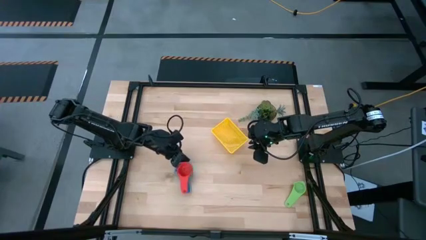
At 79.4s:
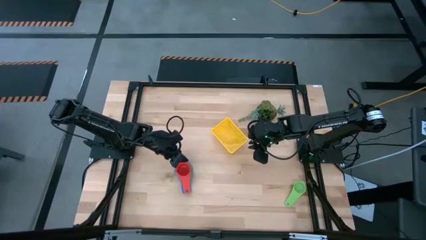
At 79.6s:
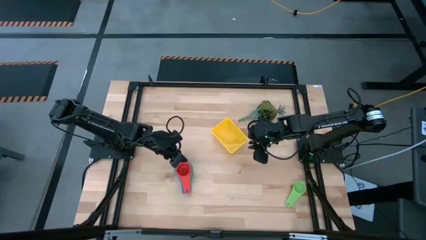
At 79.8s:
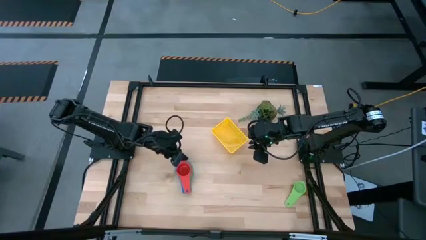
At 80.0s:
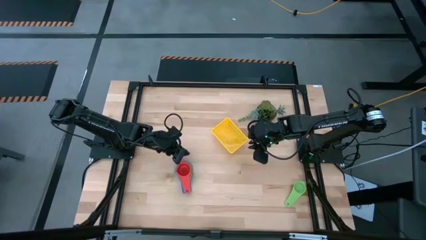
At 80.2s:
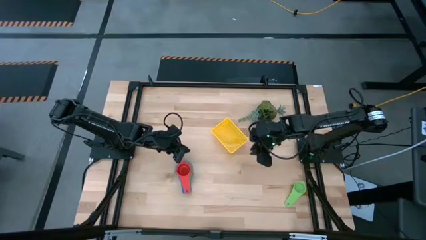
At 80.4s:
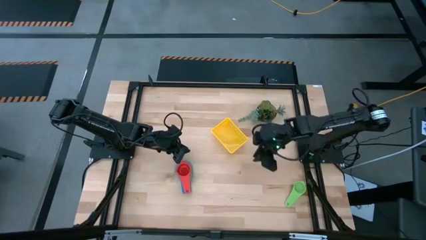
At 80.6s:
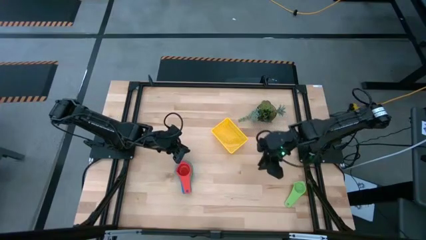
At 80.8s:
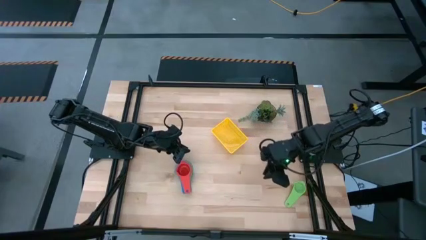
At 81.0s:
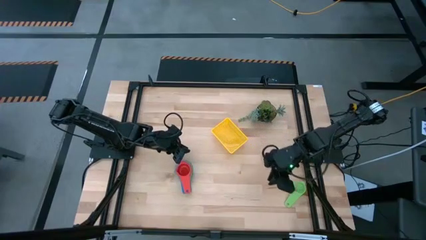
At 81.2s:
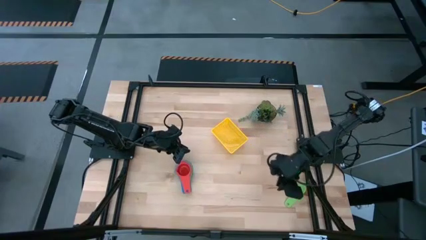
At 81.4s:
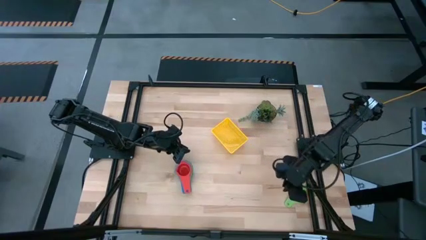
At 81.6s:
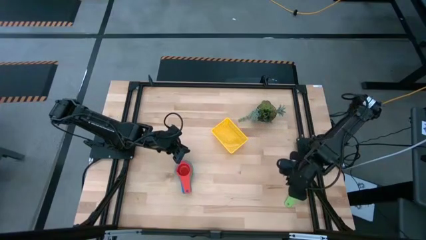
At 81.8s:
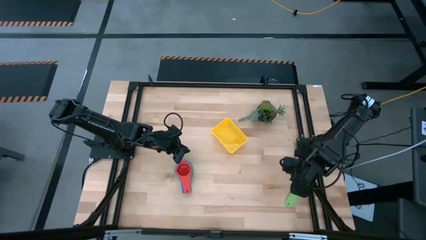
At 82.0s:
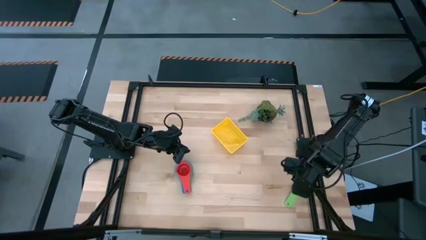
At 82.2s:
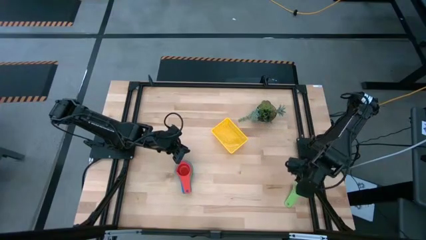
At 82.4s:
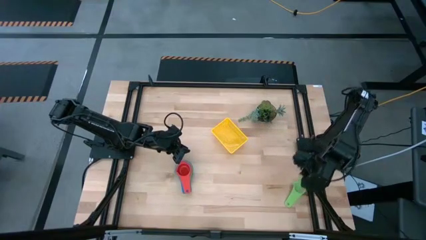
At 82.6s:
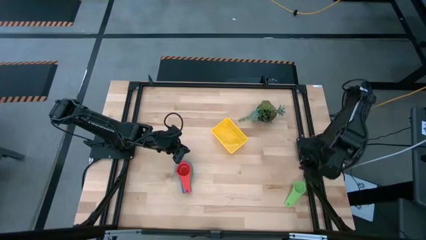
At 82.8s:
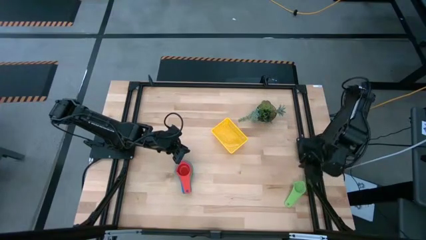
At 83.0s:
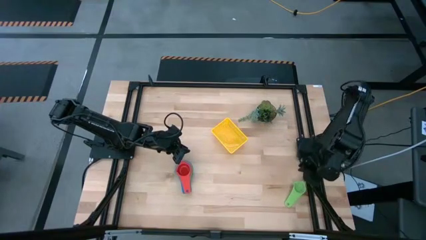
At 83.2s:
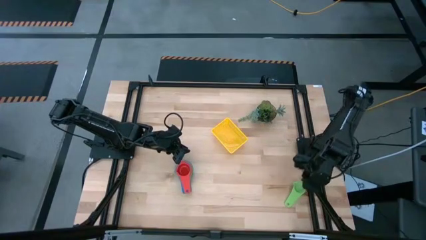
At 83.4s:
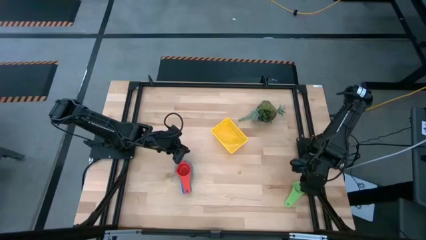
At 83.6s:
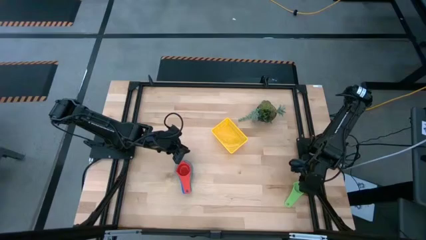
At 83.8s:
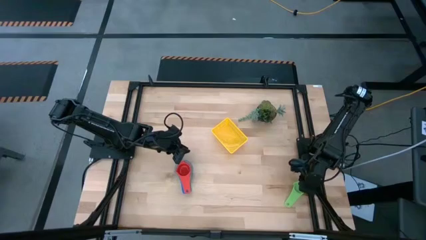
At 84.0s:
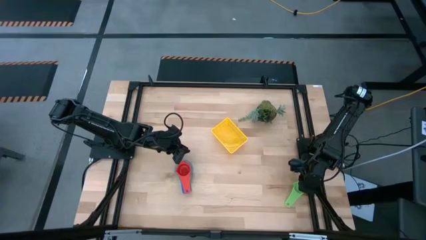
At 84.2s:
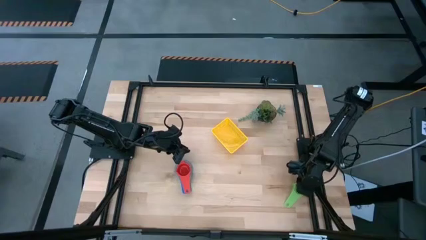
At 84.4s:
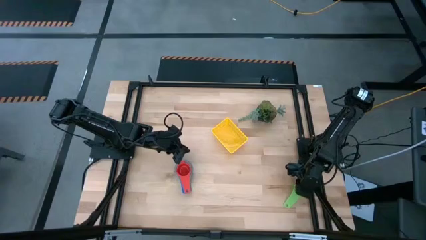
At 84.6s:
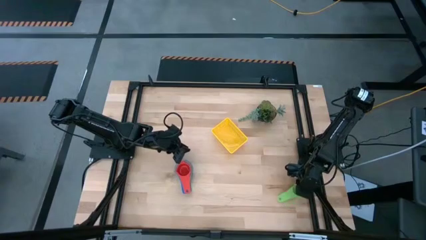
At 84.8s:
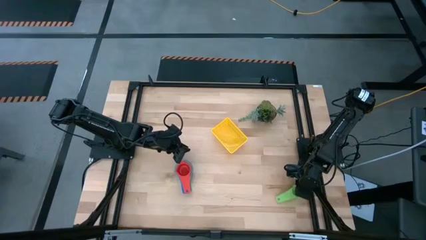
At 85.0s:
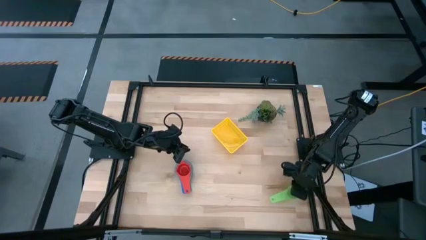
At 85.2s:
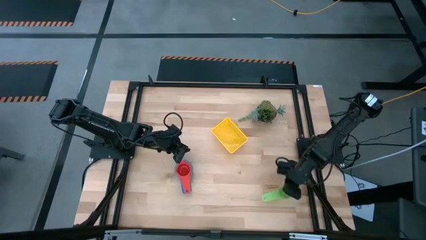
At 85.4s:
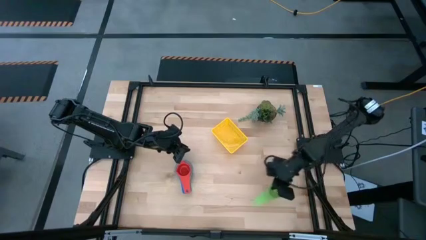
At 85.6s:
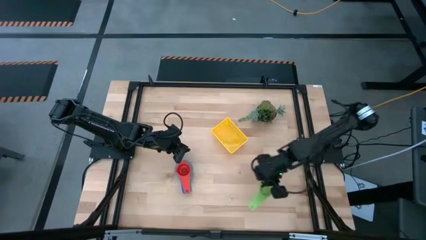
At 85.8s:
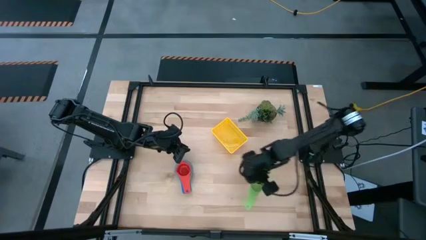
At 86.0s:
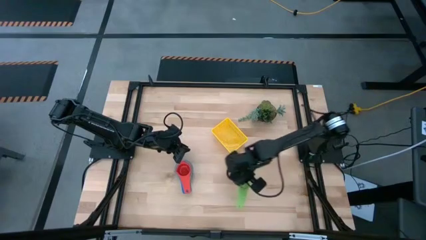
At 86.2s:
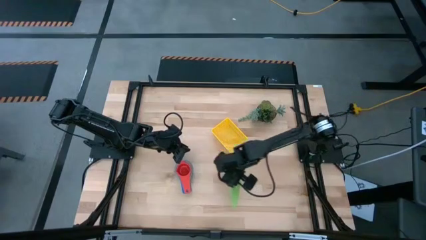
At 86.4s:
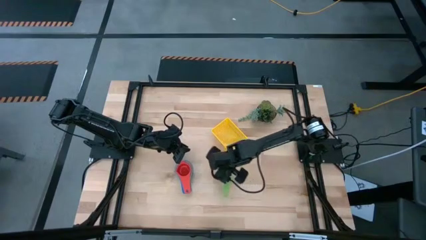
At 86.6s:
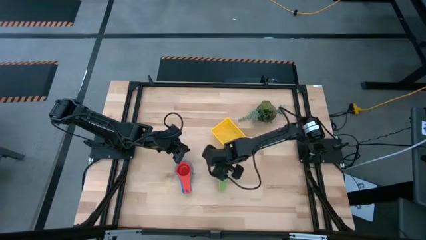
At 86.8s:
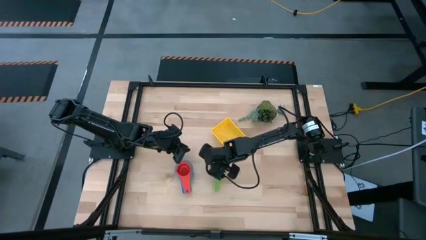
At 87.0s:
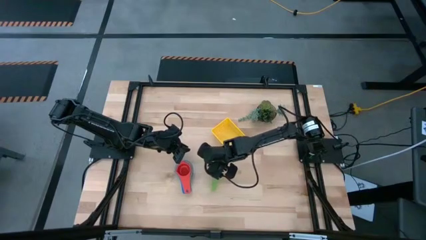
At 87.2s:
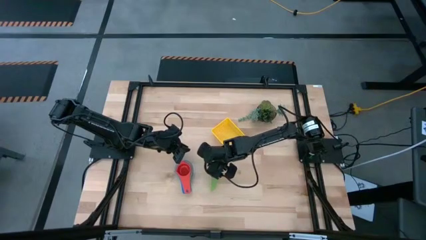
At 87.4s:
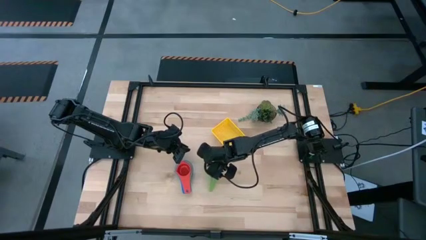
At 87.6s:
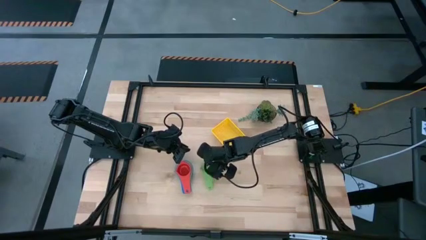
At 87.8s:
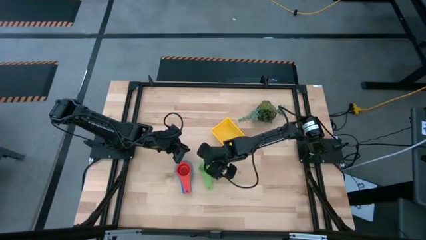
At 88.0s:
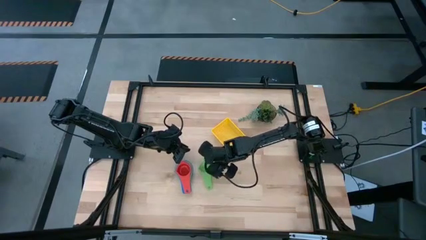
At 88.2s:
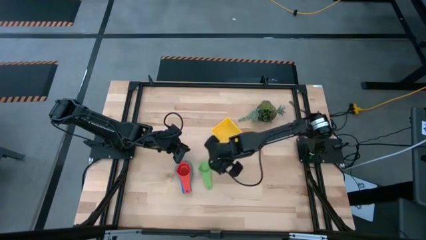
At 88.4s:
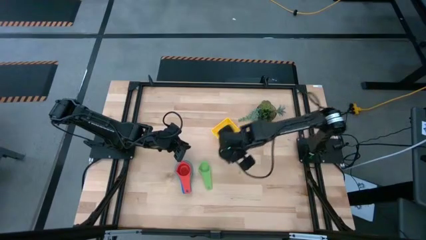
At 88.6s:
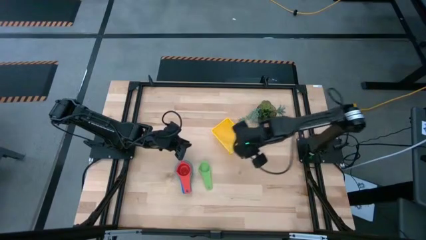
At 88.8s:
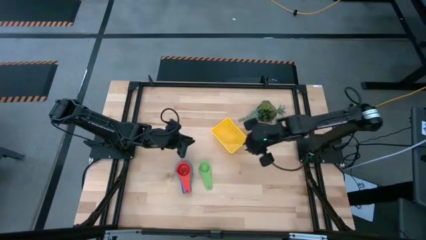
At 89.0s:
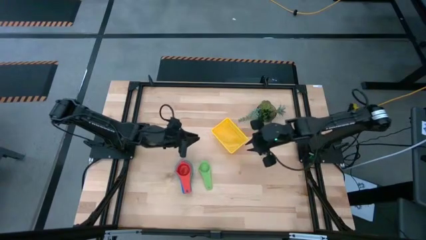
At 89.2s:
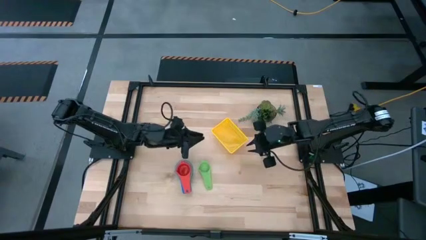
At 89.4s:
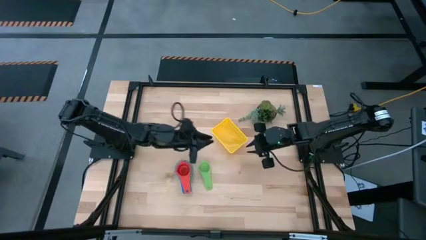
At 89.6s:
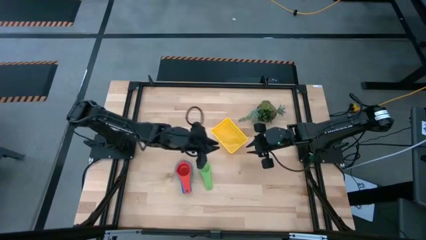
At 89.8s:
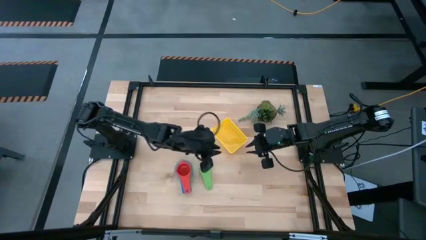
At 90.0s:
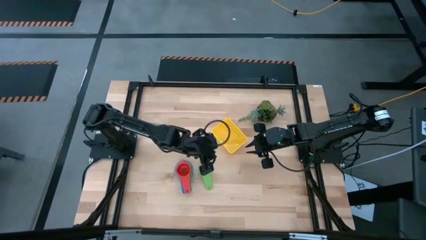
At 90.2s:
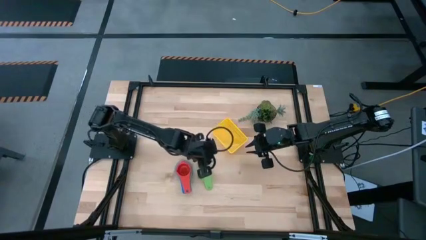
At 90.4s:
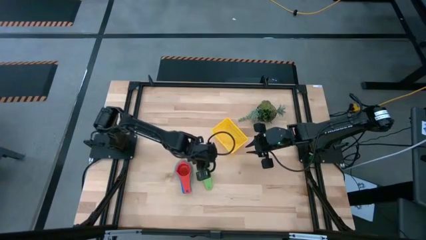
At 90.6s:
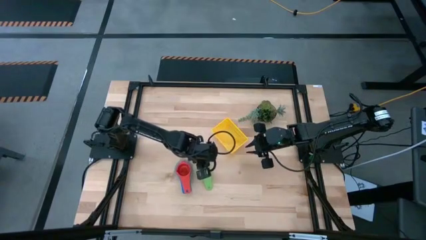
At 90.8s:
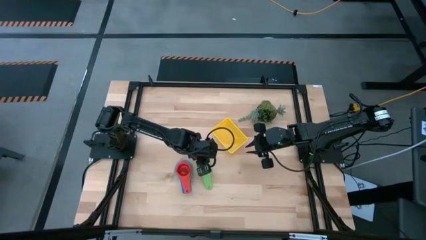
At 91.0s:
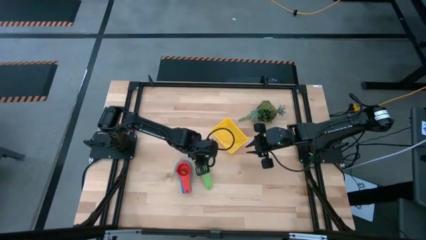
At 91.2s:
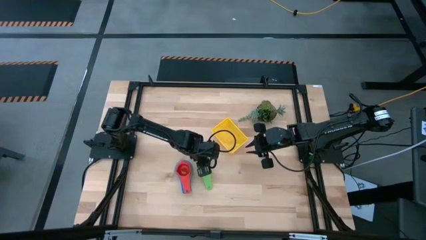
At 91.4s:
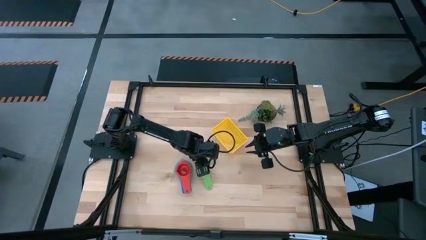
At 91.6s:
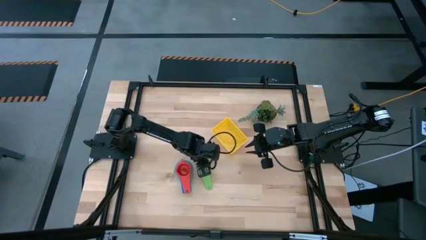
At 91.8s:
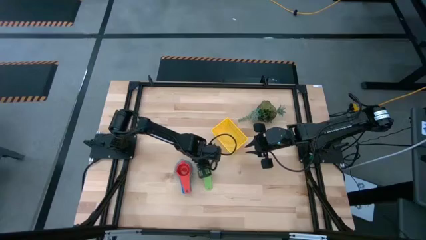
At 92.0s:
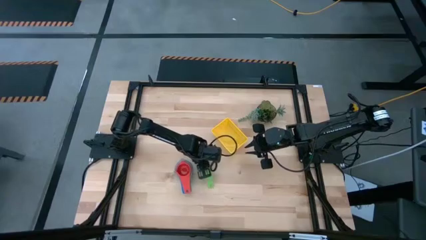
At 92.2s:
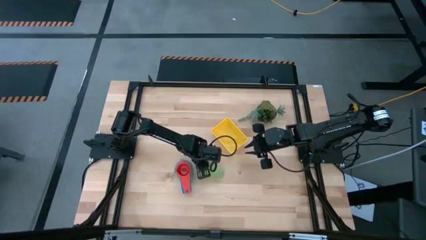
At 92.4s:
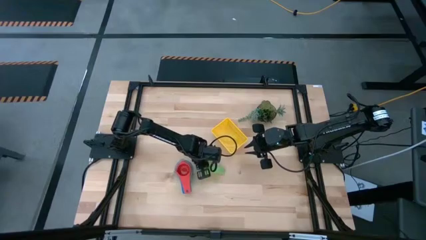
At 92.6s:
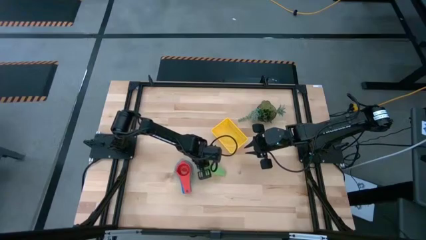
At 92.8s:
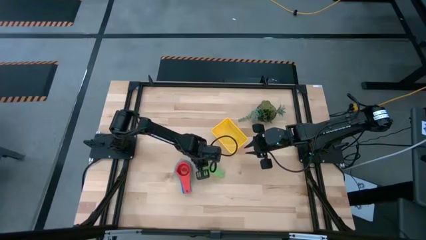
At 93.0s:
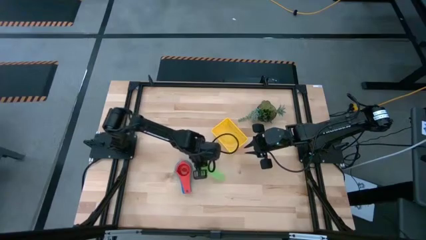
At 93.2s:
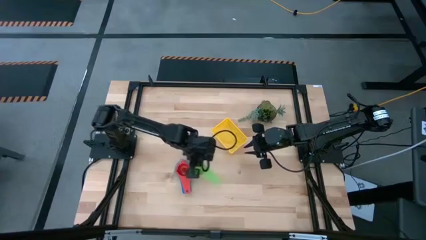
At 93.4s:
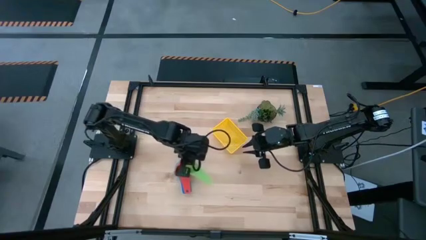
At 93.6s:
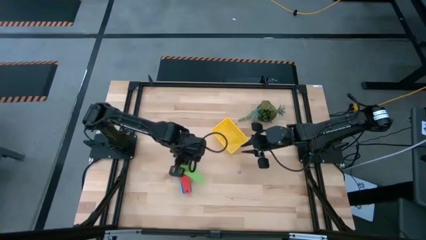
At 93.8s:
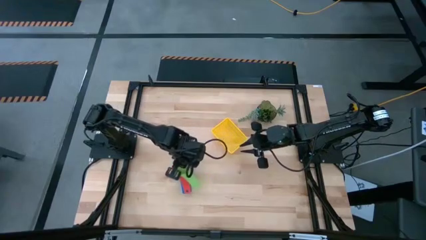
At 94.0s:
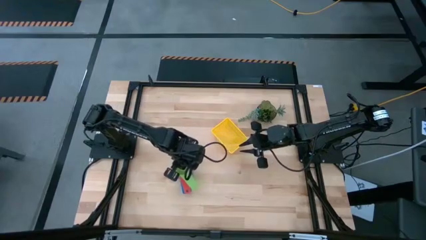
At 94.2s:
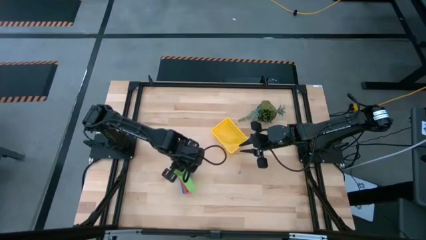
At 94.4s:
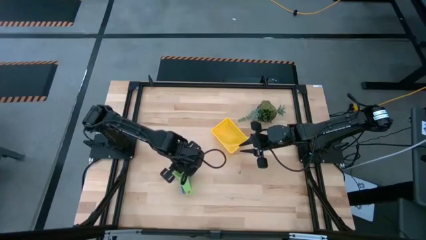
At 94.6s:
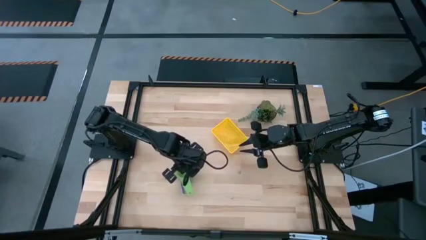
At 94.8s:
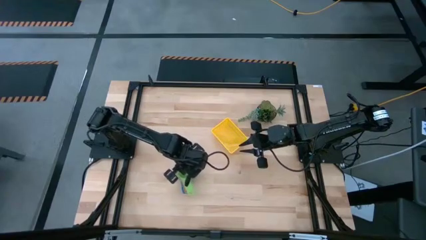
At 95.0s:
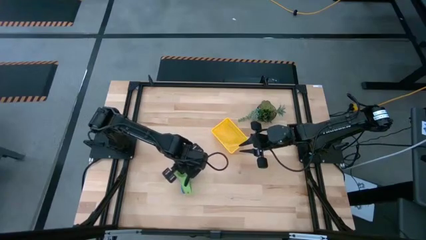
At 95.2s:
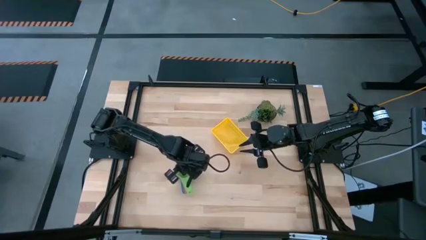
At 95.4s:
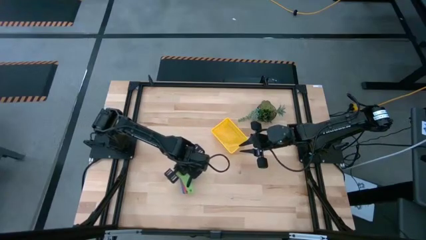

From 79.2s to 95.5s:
Task: Nest measuring cups in basket
Stack the green measuring cup on top of the red measuring cup

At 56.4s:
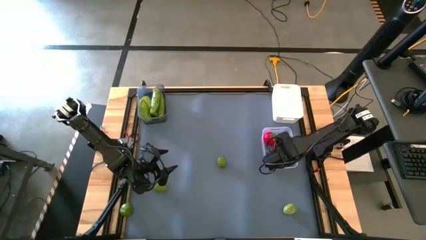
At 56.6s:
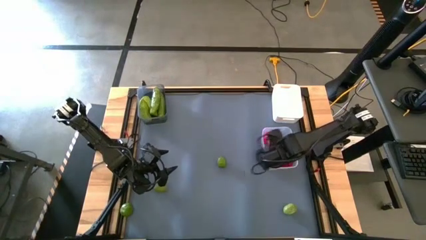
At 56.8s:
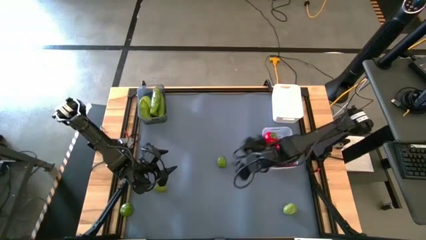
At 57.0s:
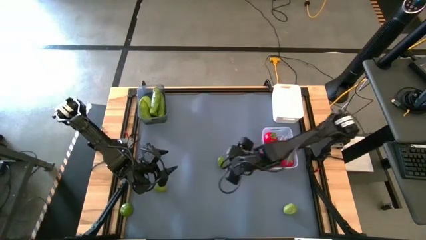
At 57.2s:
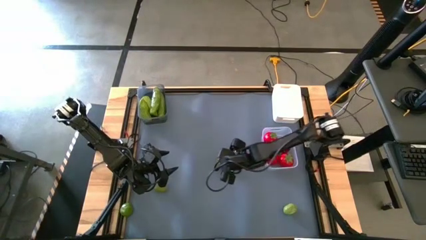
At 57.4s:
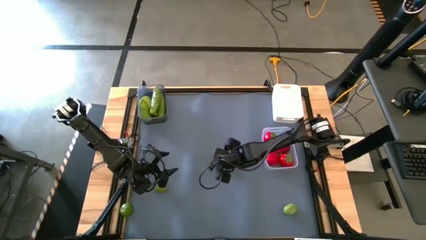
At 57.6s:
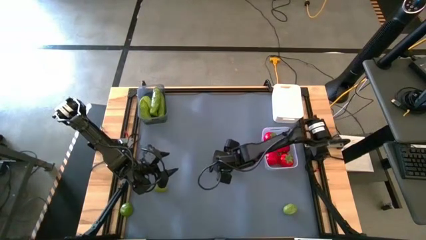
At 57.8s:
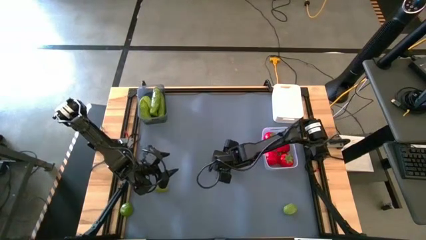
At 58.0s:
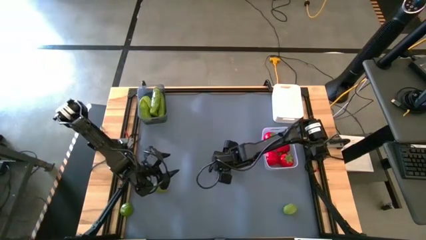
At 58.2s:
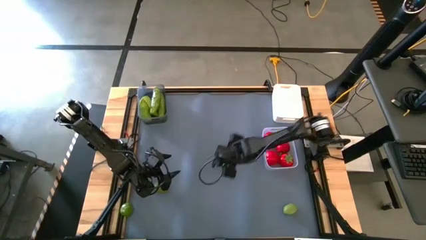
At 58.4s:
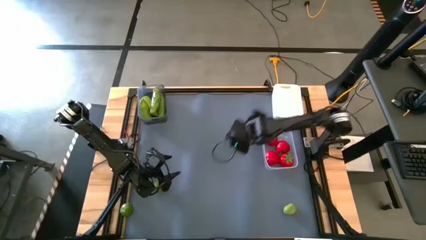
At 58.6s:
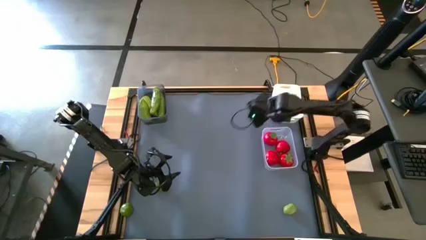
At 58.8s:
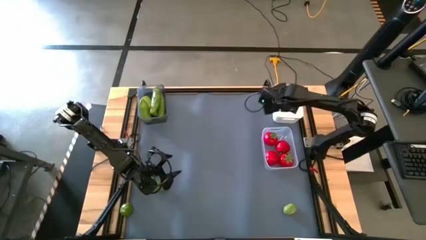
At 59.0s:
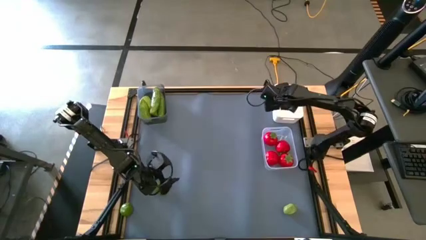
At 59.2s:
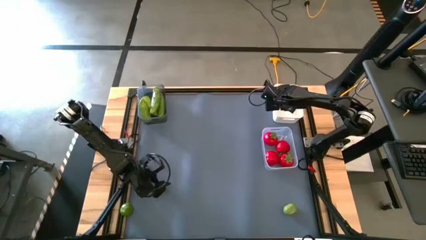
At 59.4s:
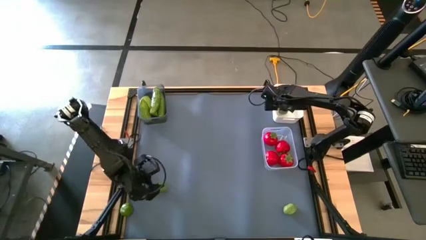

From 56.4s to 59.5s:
Task: Sort produce into baskets
Put the lime into the white bin
